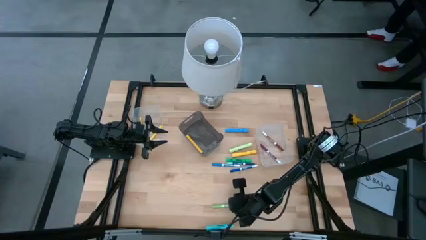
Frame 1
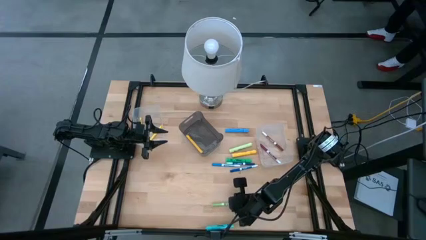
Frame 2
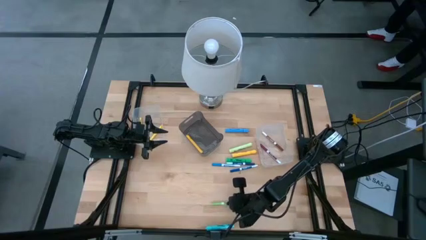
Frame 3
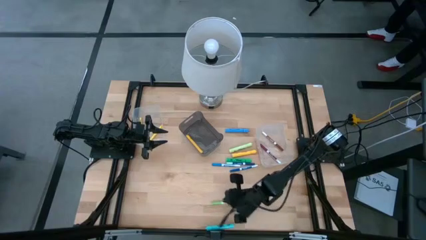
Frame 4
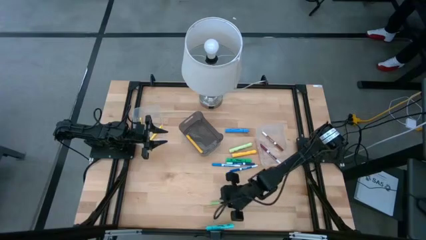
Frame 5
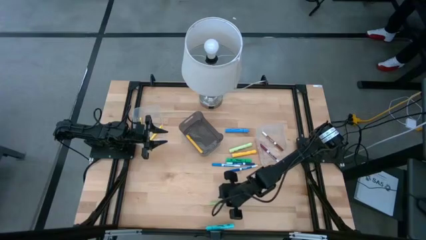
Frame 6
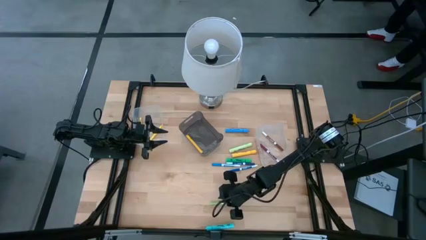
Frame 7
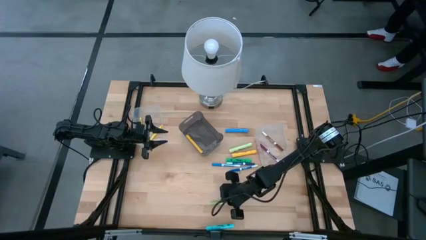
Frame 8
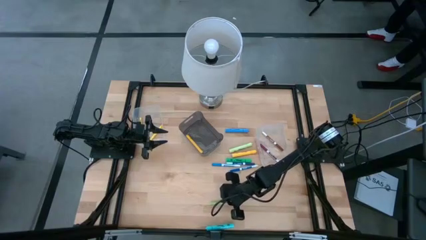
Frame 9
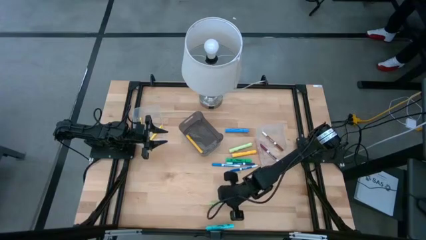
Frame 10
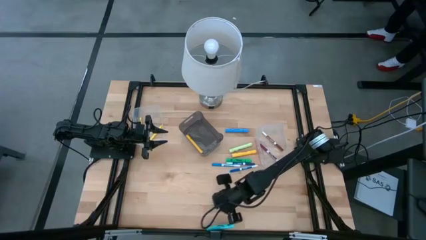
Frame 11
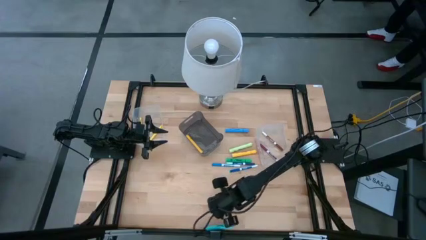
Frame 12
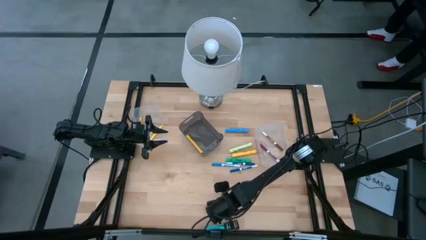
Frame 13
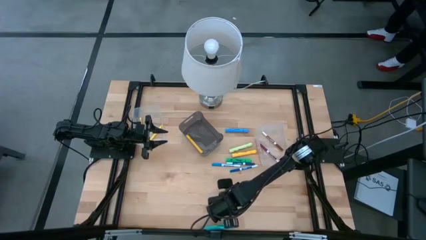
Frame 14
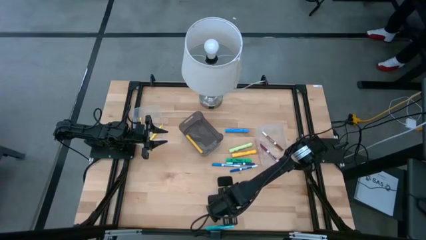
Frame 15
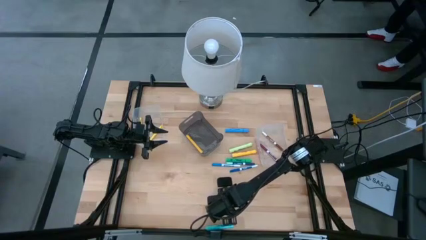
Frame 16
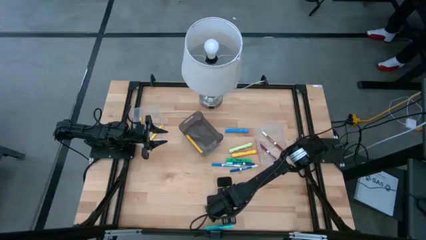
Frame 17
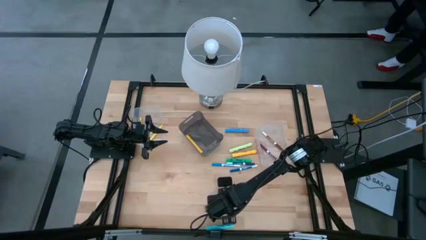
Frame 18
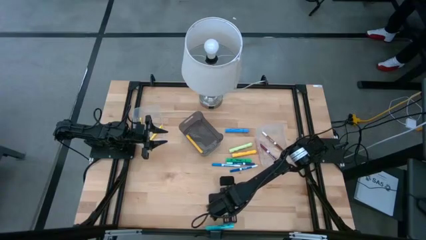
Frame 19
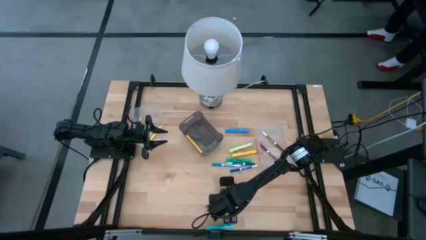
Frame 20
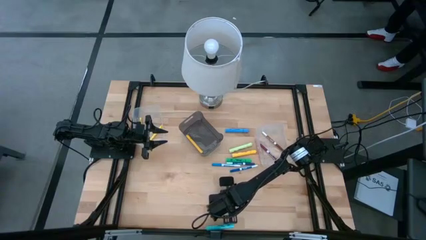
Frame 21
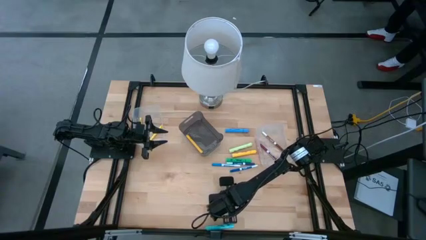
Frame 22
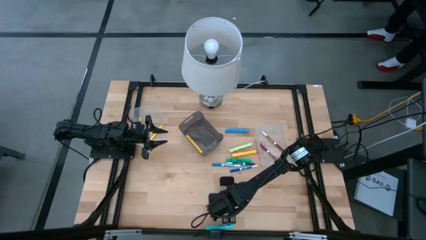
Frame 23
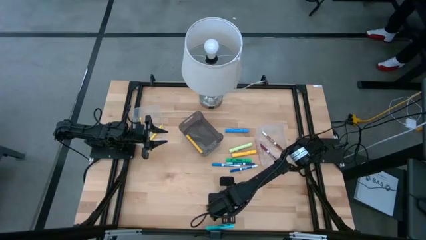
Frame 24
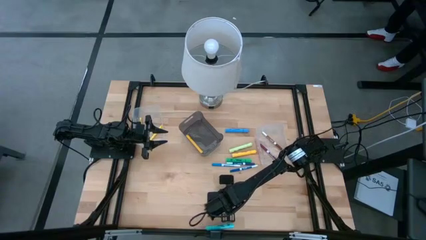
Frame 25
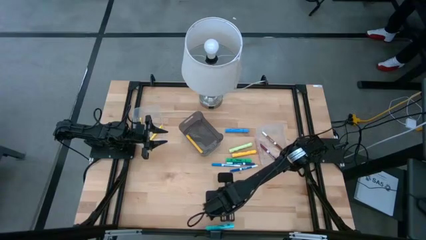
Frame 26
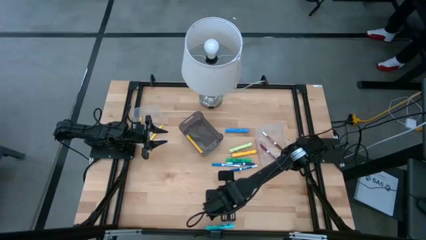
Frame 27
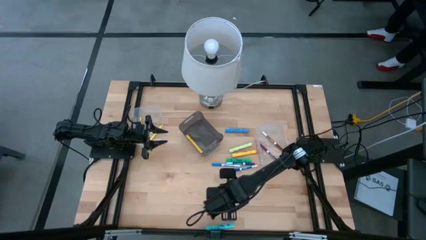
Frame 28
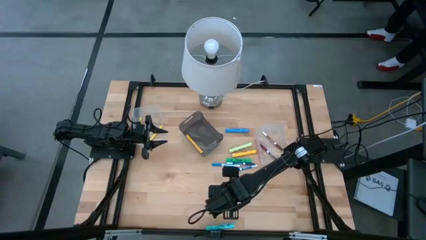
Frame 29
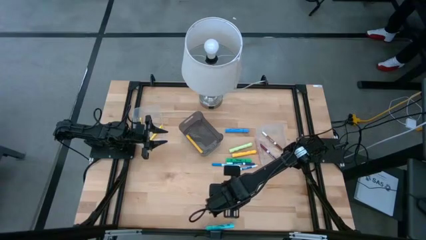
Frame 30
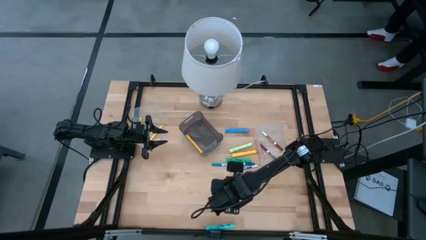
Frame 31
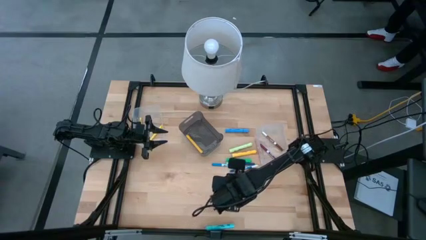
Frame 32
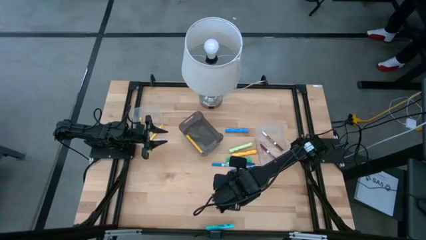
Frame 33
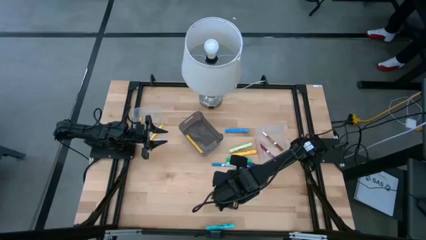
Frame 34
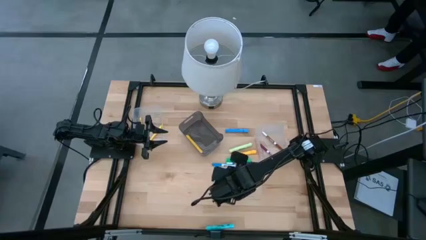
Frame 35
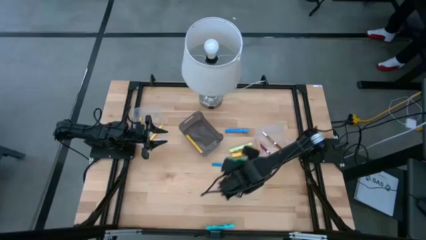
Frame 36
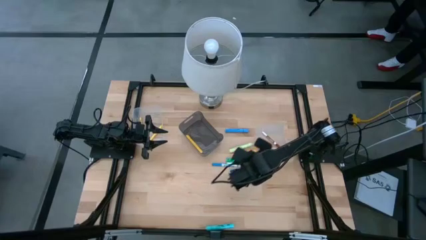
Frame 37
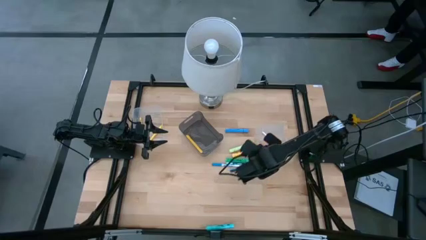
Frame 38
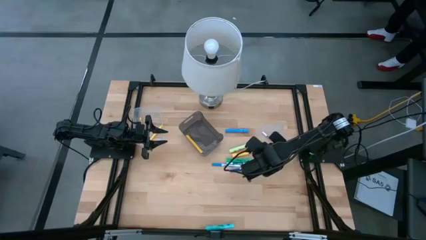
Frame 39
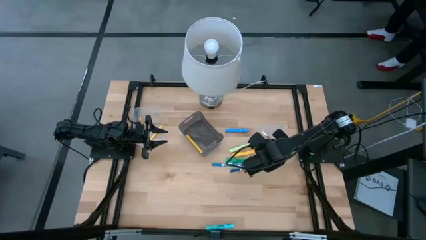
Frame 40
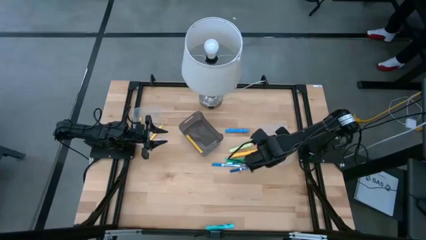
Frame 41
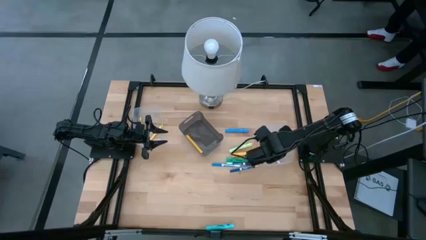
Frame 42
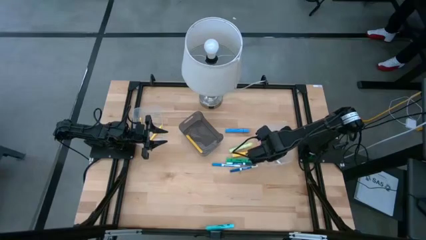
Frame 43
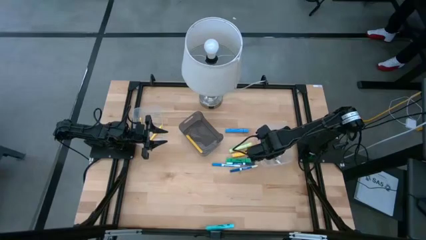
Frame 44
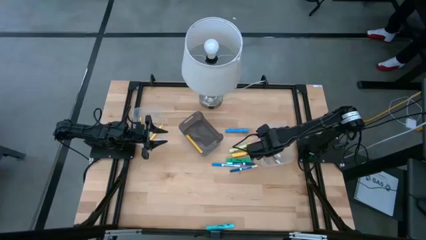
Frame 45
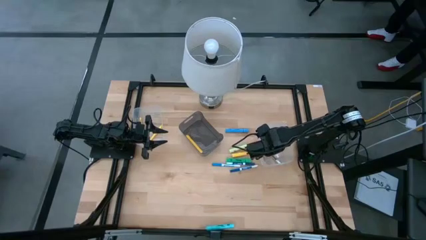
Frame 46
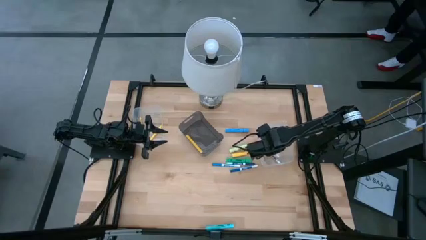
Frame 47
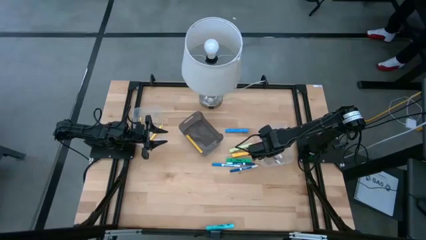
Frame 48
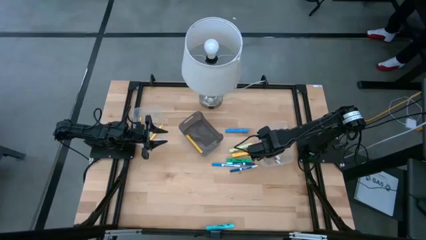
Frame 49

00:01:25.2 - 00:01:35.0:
Task: Pick & Place Markers
Put the green highlighter into the right transparent bin
